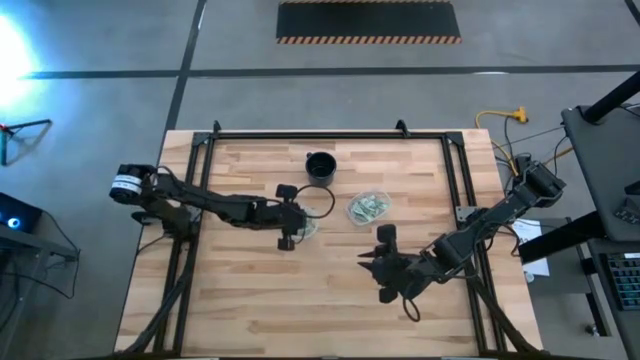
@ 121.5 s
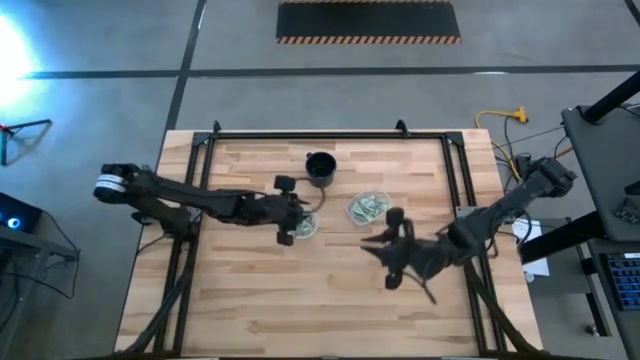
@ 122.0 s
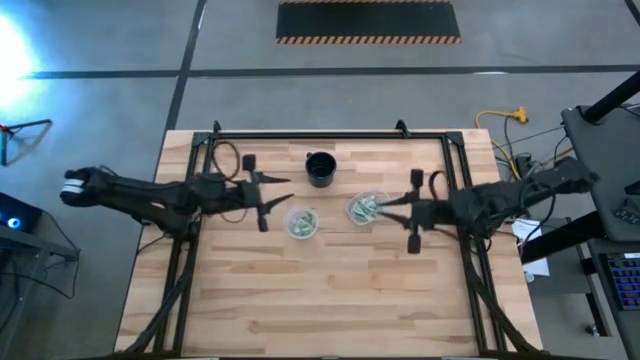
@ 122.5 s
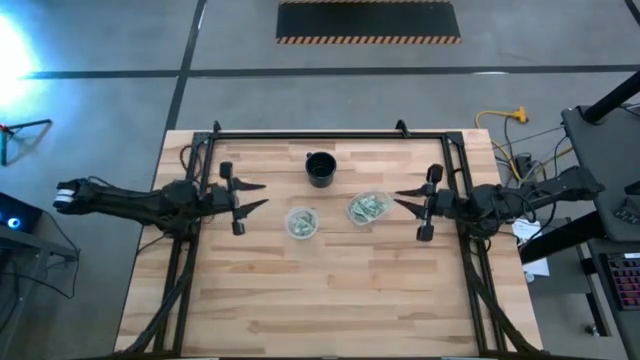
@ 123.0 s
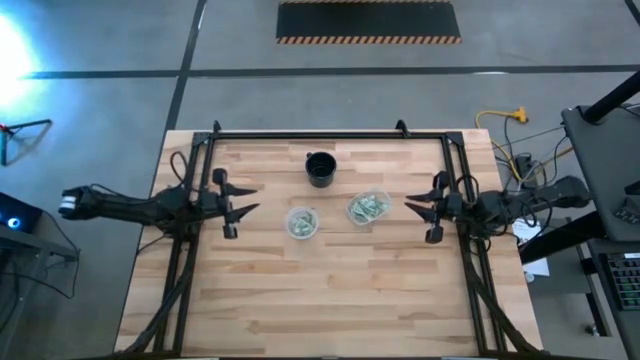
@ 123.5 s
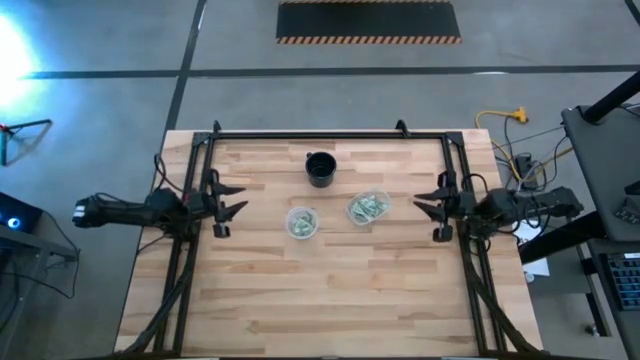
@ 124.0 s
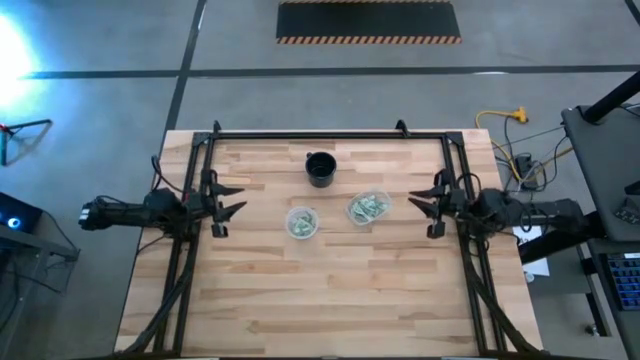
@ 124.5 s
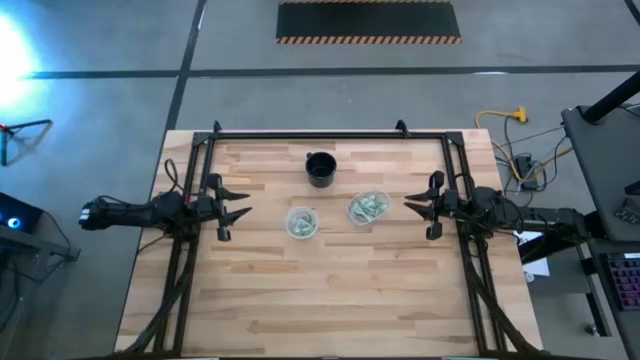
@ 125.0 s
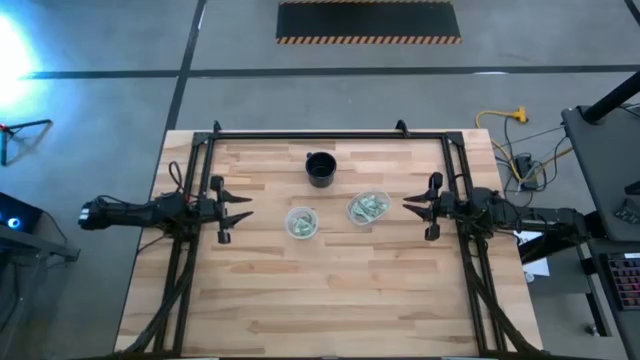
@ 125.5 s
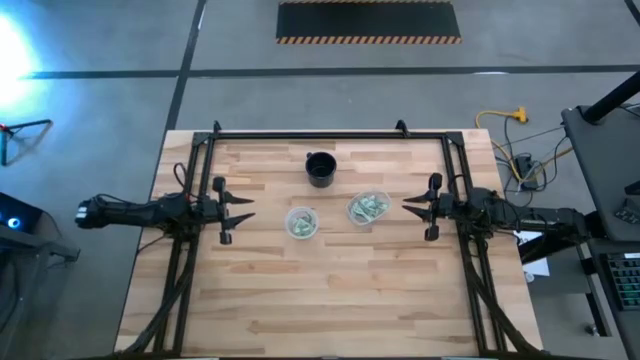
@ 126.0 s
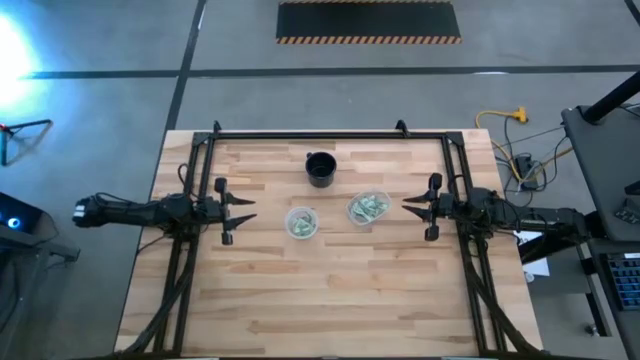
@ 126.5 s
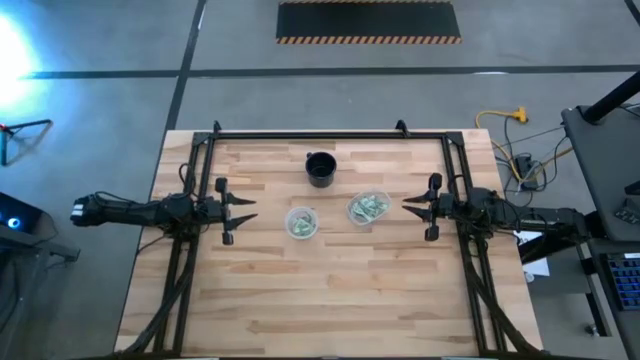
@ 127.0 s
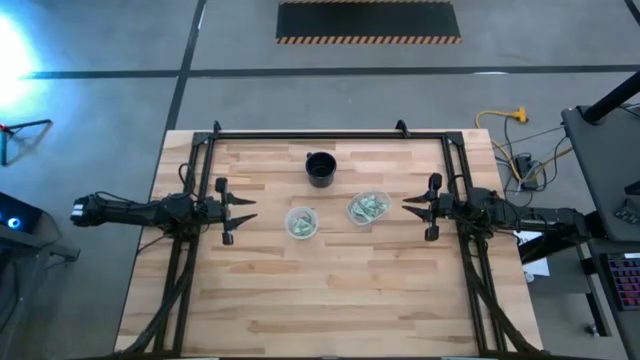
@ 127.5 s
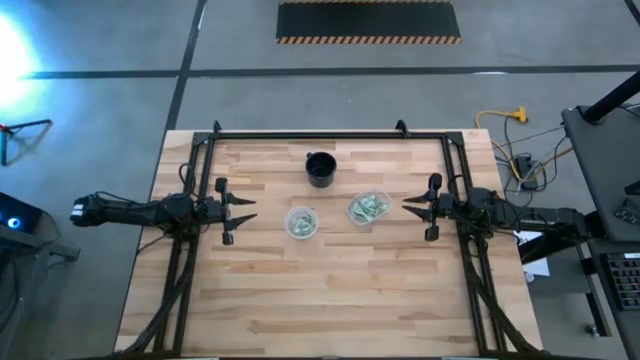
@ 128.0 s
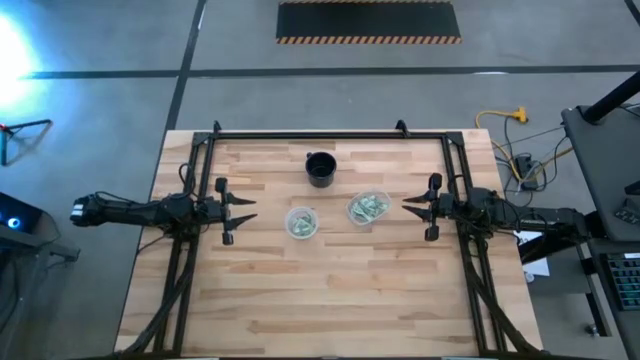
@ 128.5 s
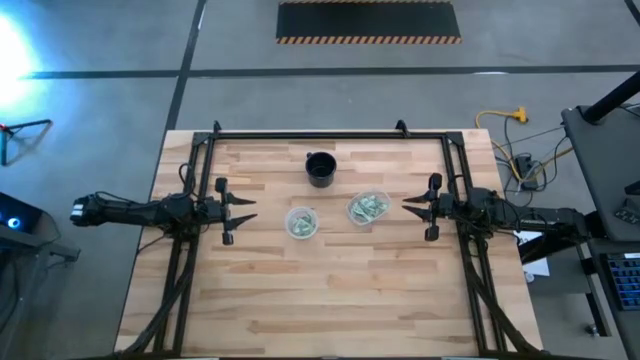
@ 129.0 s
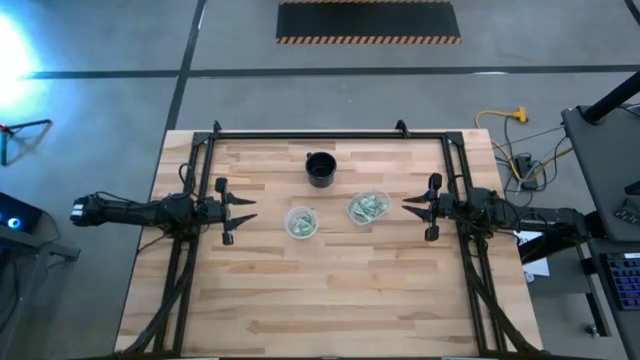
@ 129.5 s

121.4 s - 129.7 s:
Task: Pick and place Stevia / Truvia into bins
Return to Home Position

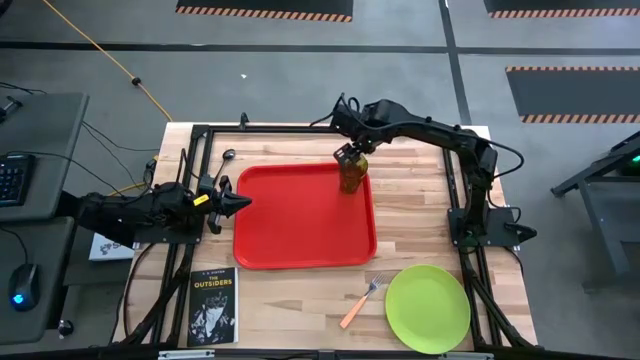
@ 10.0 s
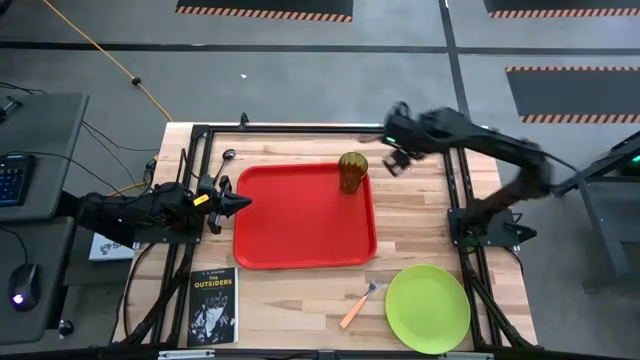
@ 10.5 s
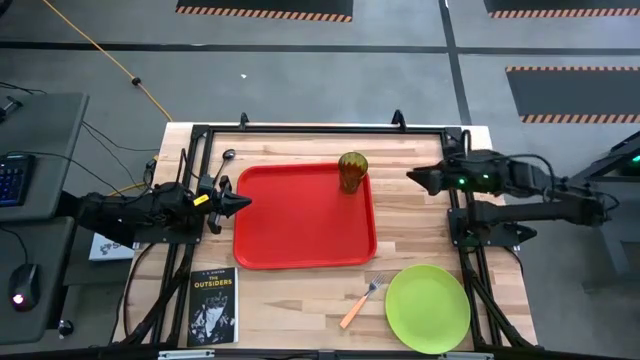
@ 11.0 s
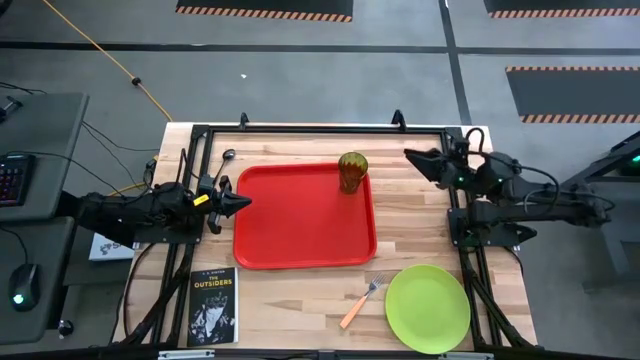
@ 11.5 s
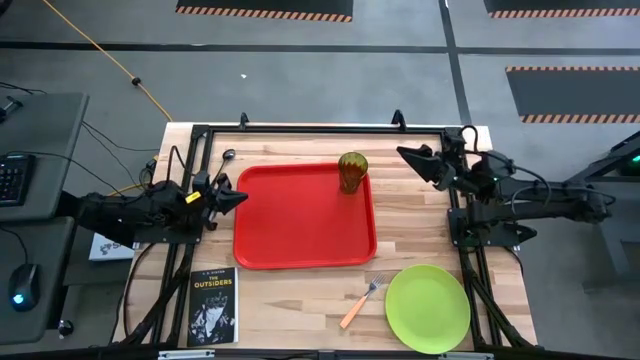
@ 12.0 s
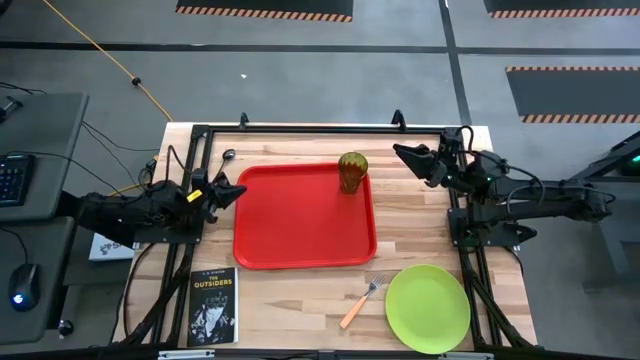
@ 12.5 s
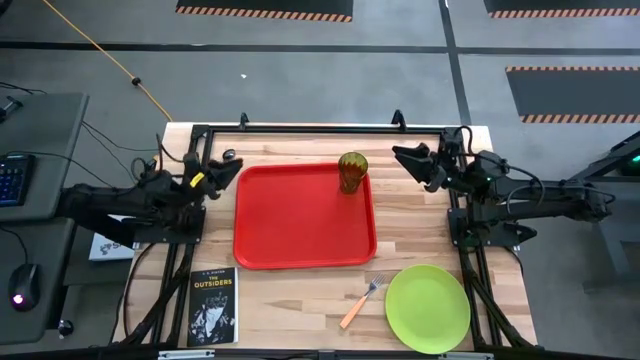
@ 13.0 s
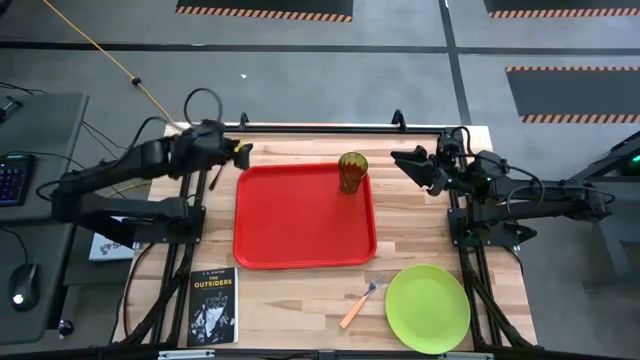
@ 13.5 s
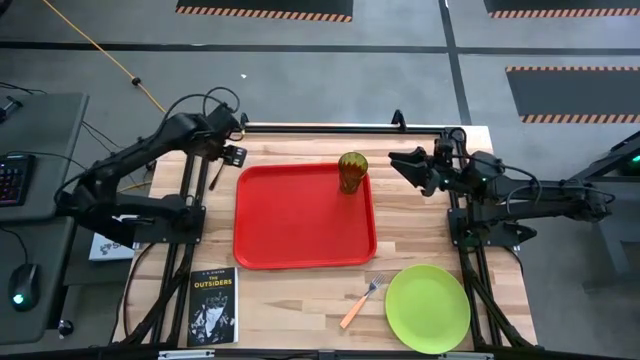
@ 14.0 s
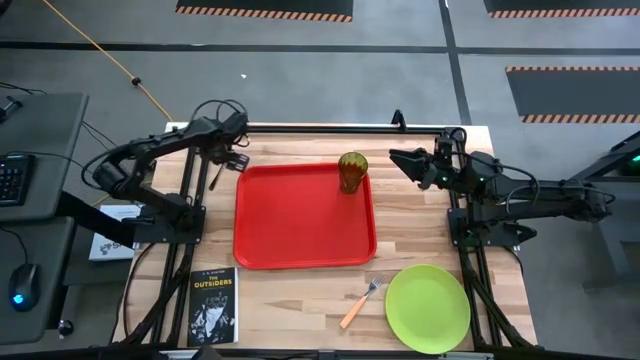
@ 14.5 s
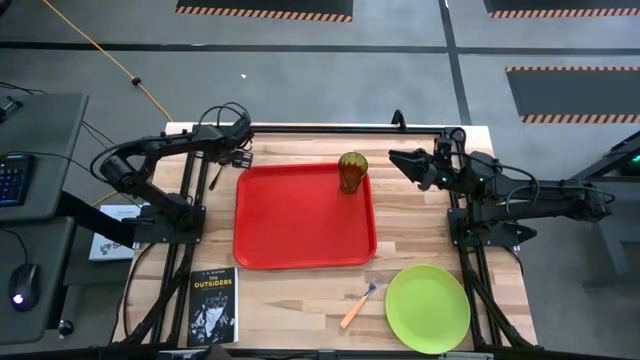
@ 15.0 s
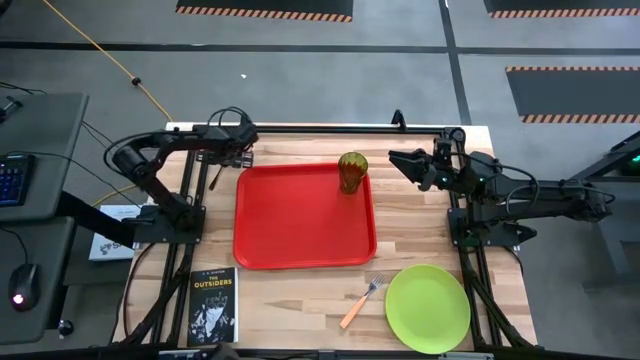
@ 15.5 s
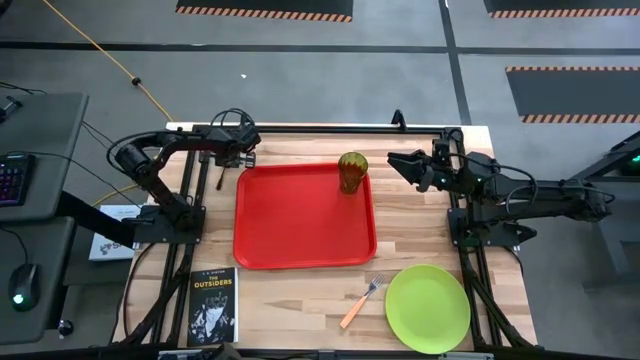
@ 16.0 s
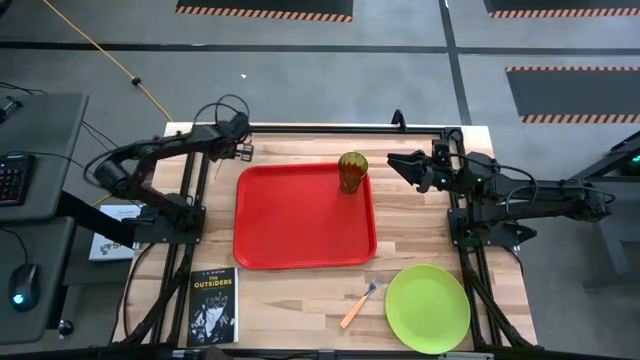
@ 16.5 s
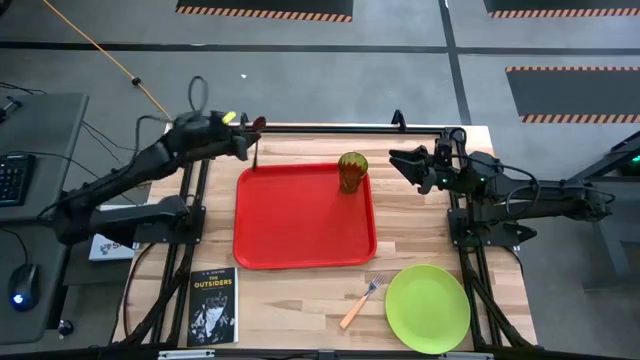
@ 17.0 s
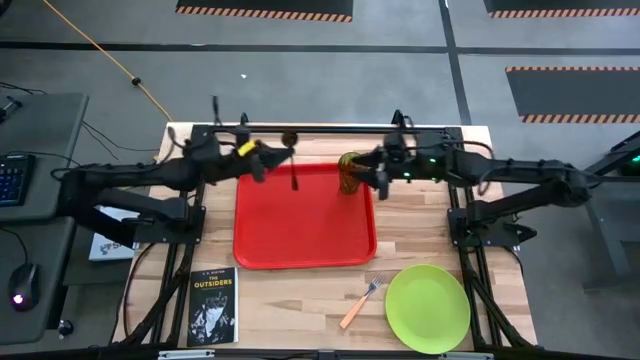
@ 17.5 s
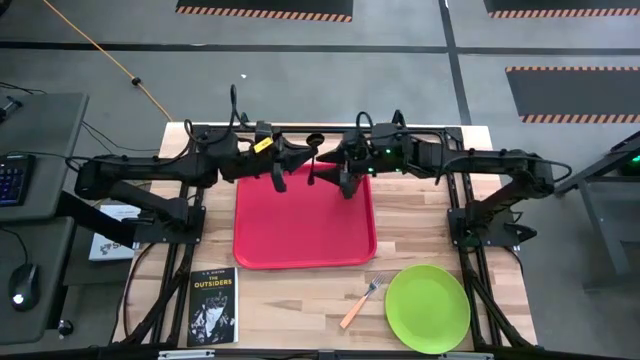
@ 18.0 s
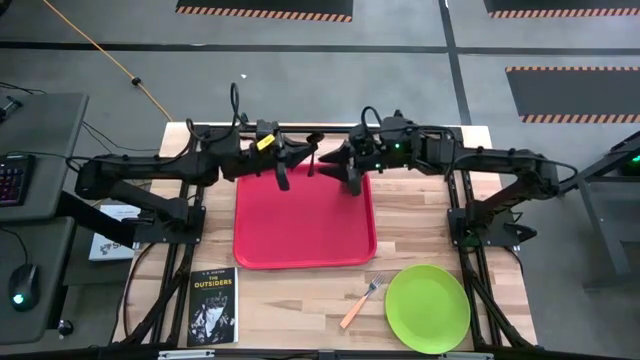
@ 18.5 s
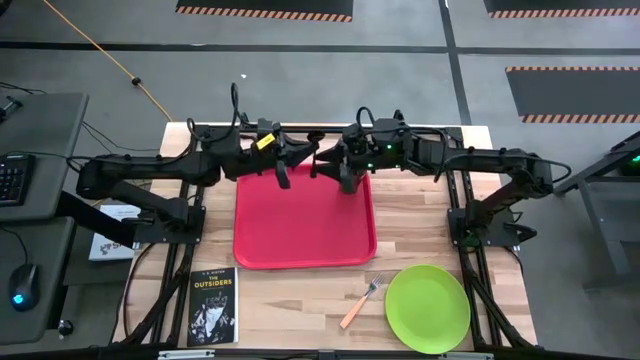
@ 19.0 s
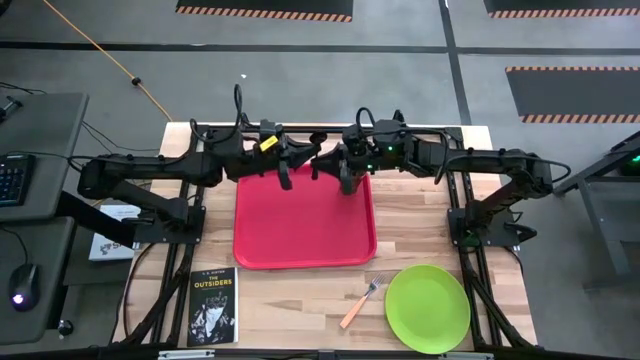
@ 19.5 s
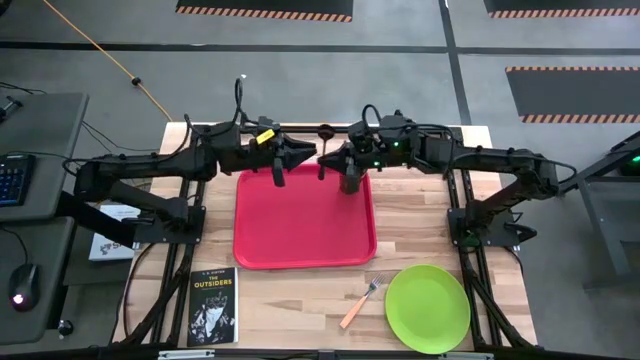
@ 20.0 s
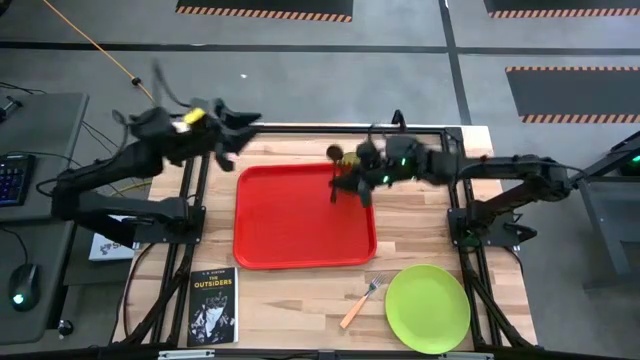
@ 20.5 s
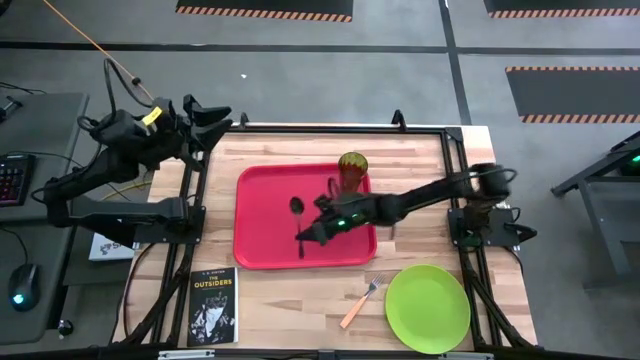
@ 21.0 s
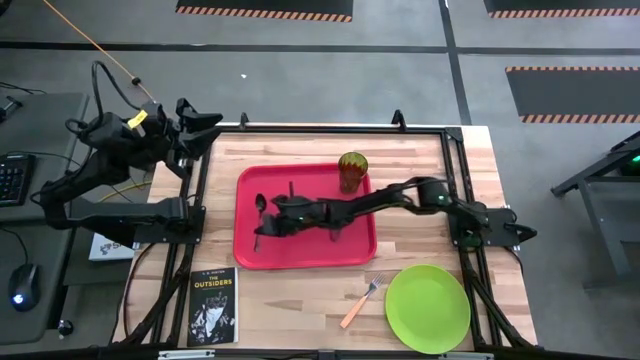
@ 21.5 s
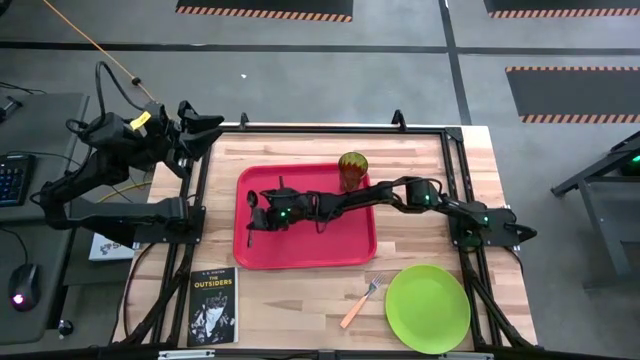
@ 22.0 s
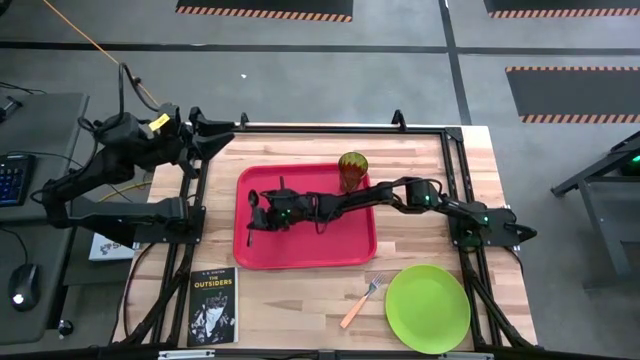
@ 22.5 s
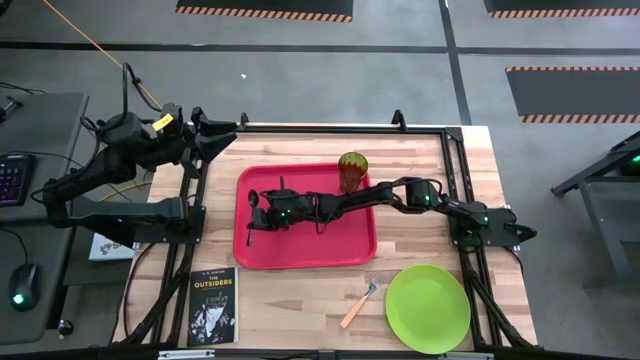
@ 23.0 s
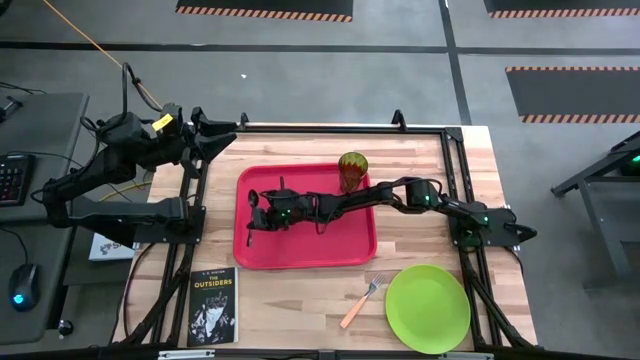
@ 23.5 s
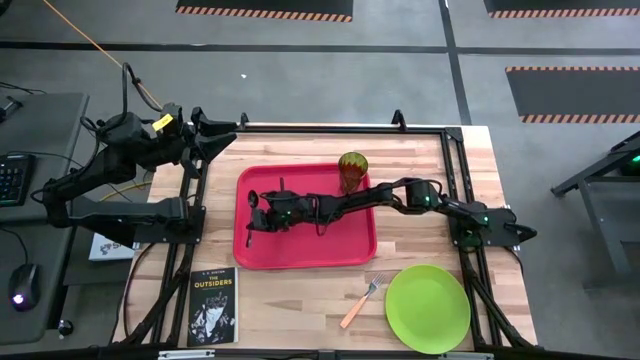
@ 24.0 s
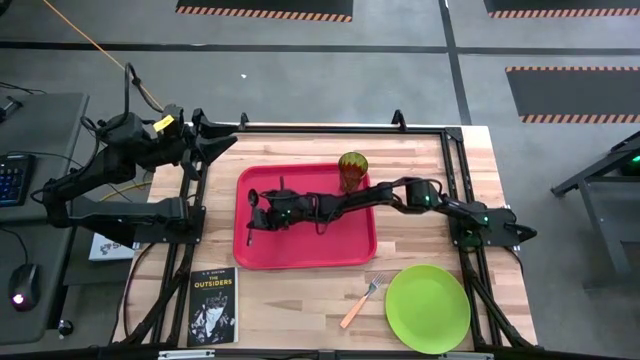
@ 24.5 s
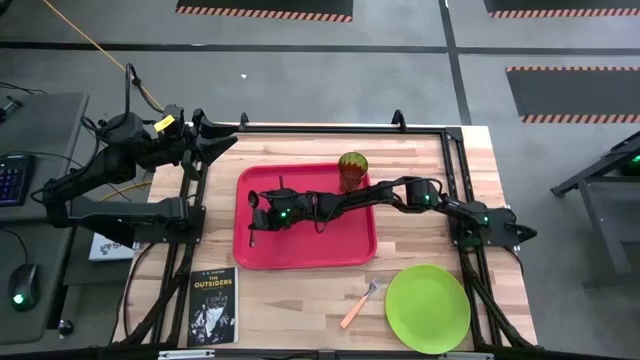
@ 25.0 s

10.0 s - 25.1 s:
Task: Pick and place plate/cup/fork/spoon on tray
Put the black spoon to the left side of the red tray
